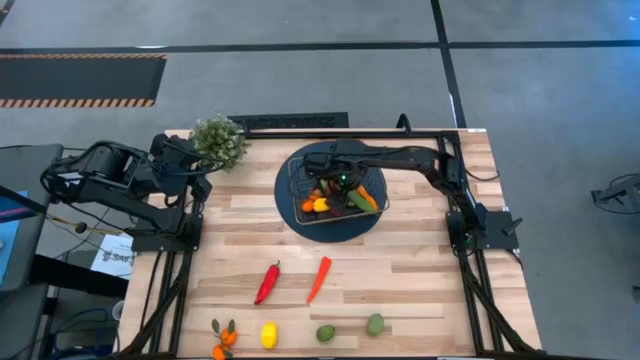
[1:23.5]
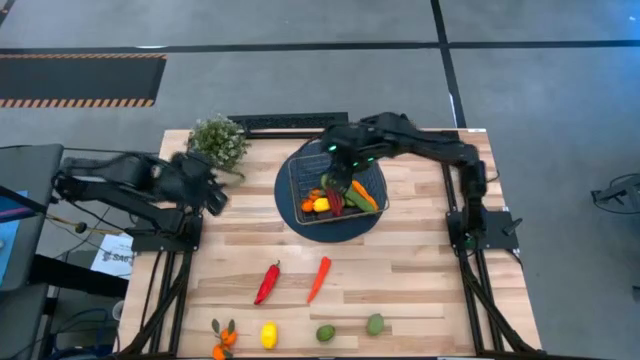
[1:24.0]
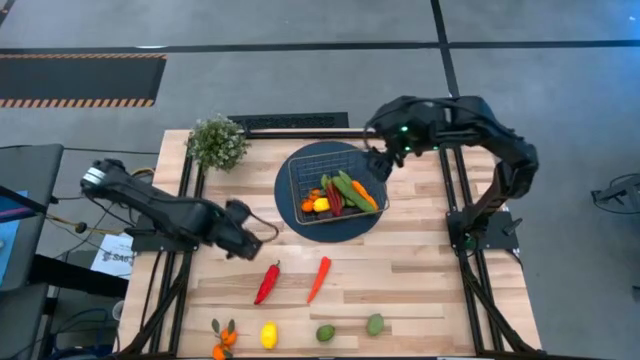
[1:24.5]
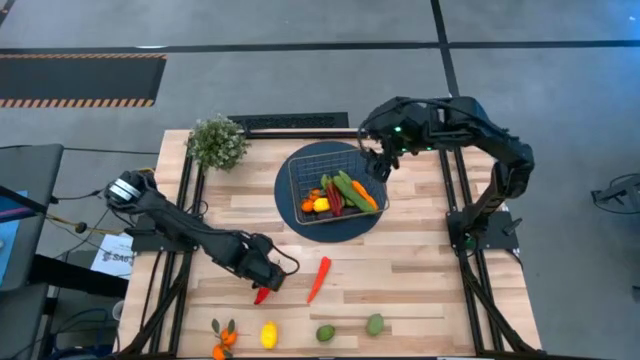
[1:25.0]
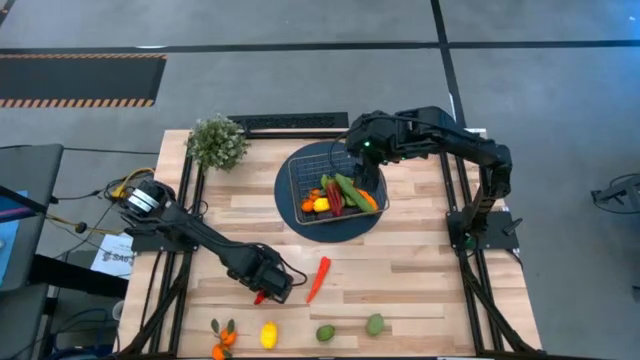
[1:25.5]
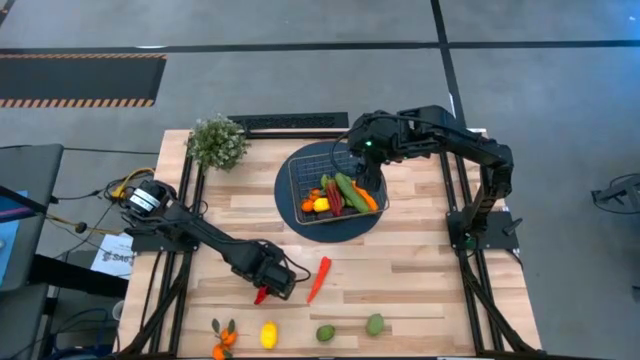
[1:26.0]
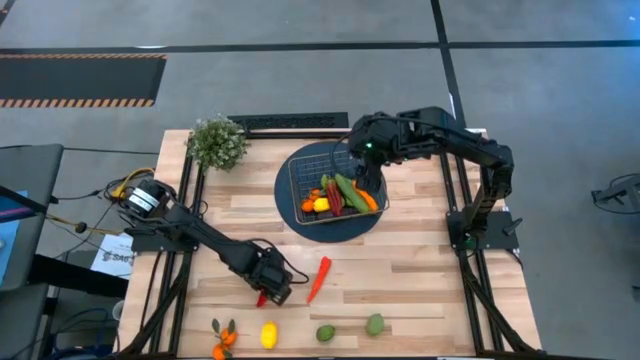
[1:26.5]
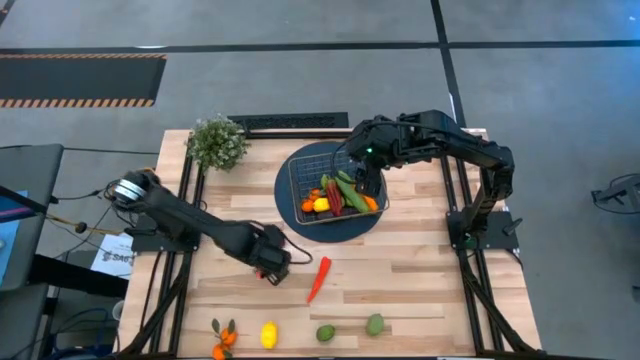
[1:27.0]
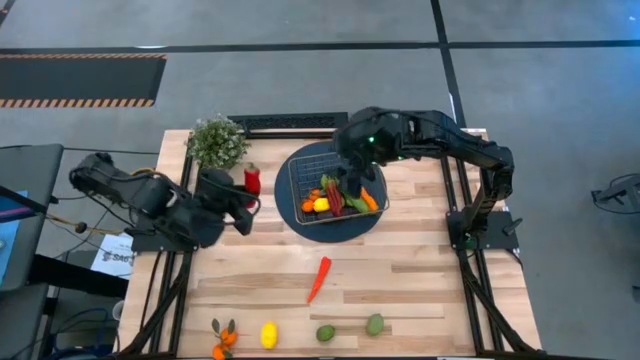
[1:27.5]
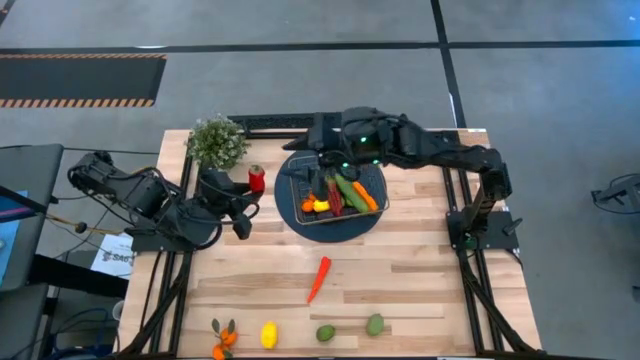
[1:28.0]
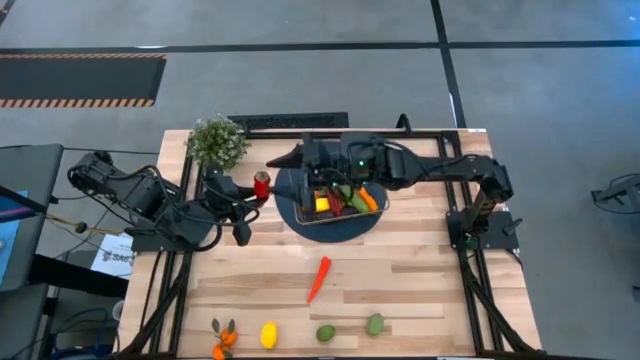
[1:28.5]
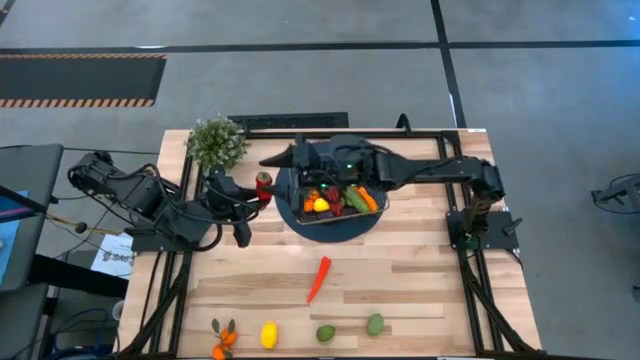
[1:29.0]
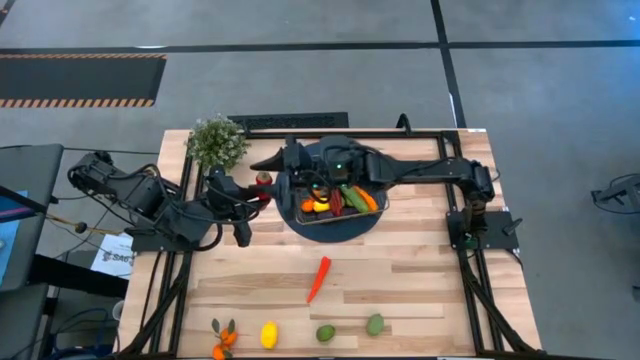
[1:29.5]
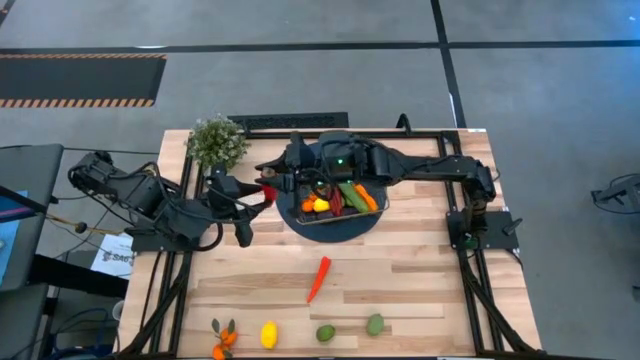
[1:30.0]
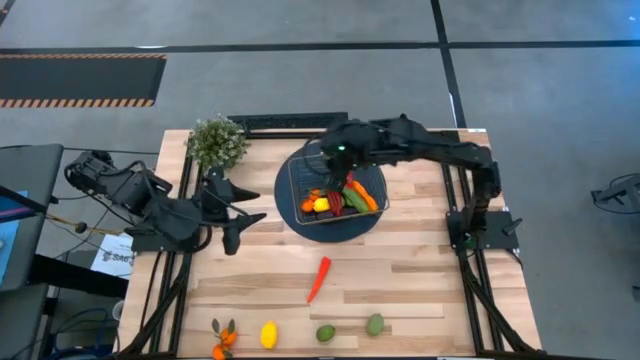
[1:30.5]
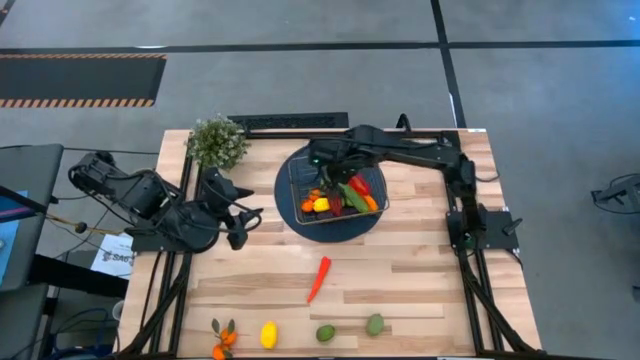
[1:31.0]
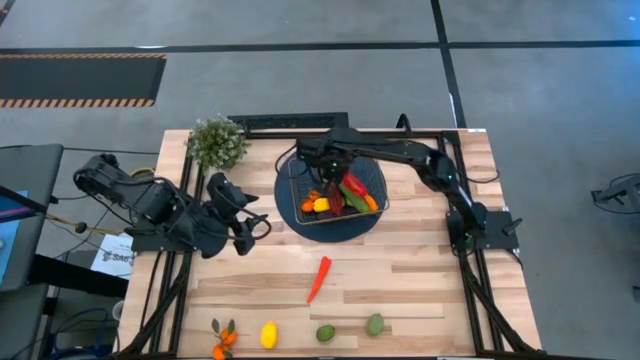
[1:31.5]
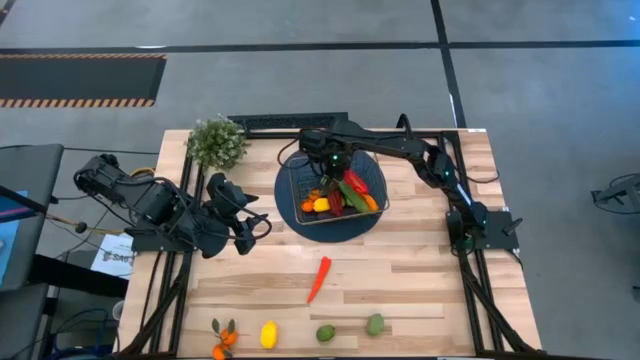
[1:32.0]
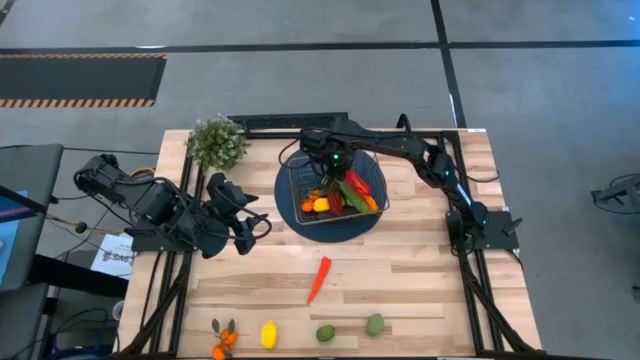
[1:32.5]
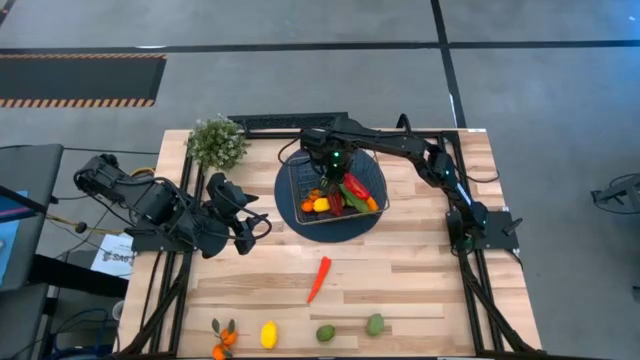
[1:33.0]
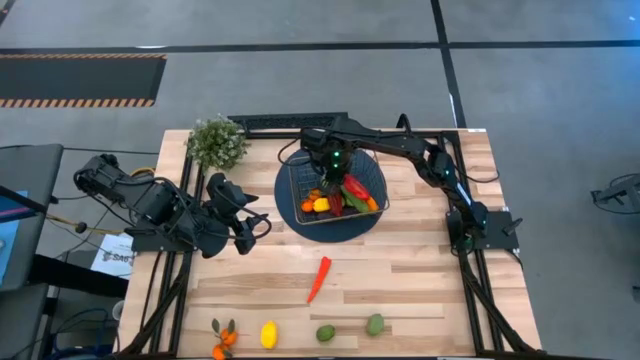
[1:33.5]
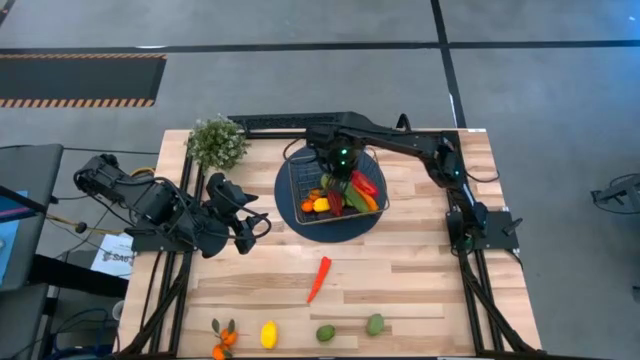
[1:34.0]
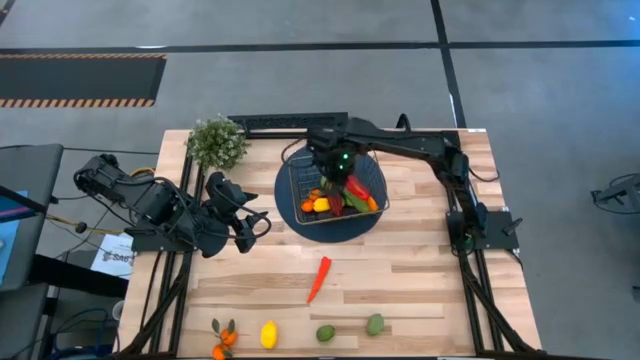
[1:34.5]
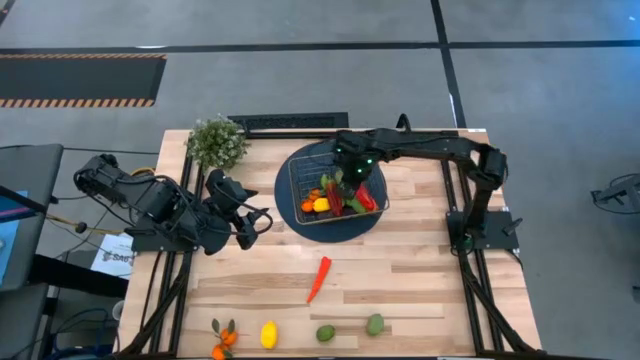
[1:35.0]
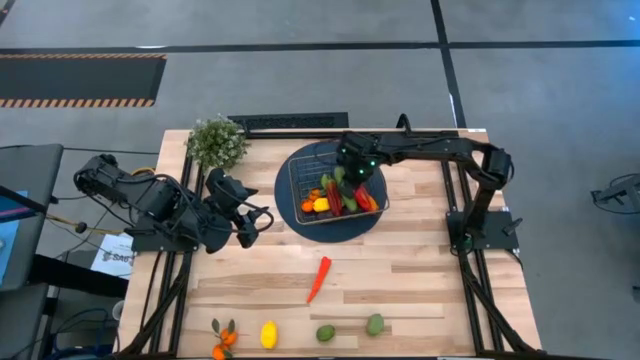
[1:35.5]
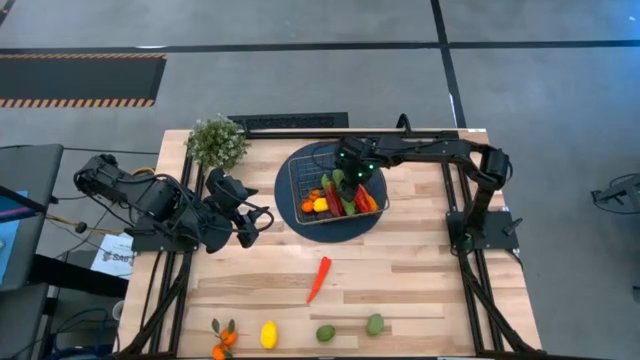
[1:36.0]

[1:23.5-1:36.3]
Task: Build produce basket
Put the red bell pepper into the basket

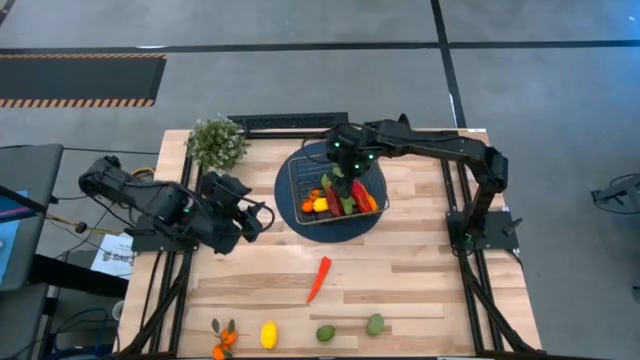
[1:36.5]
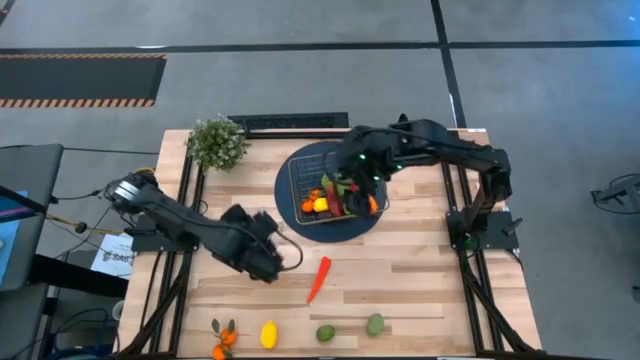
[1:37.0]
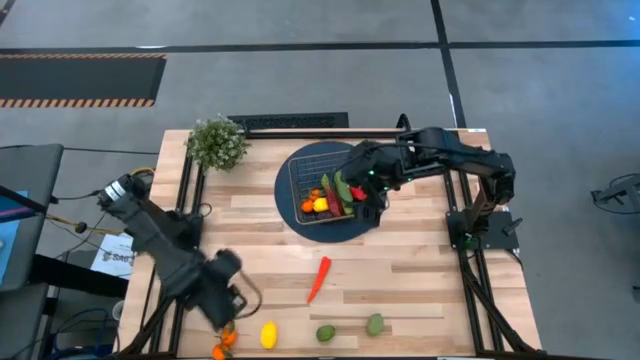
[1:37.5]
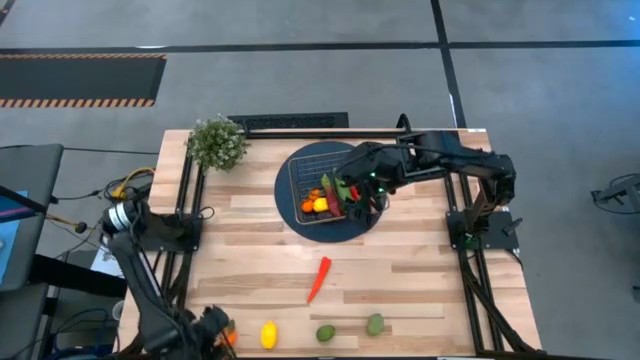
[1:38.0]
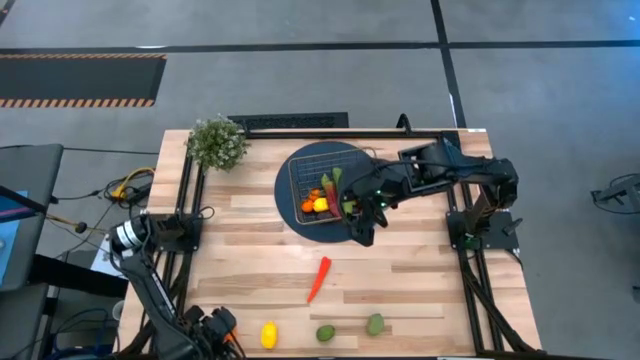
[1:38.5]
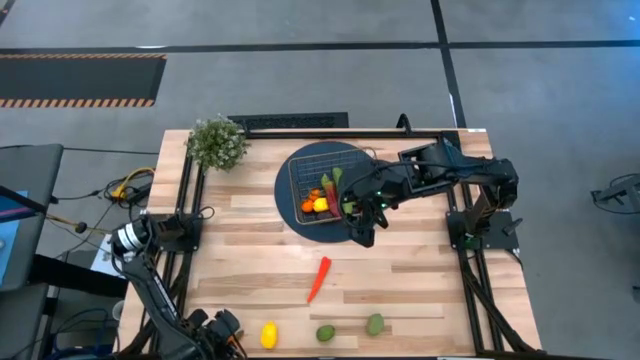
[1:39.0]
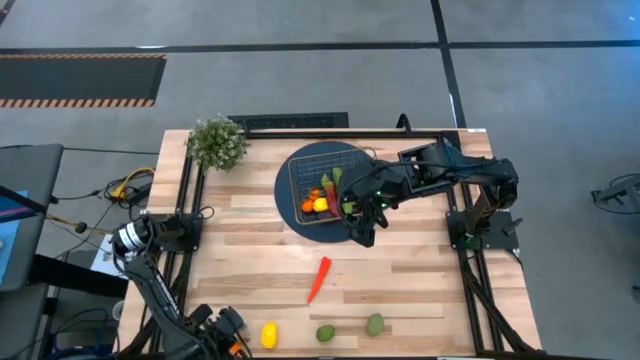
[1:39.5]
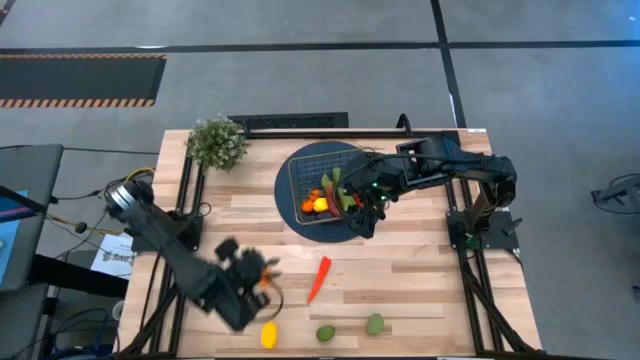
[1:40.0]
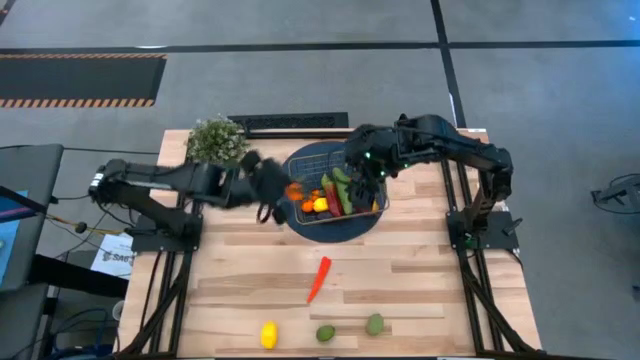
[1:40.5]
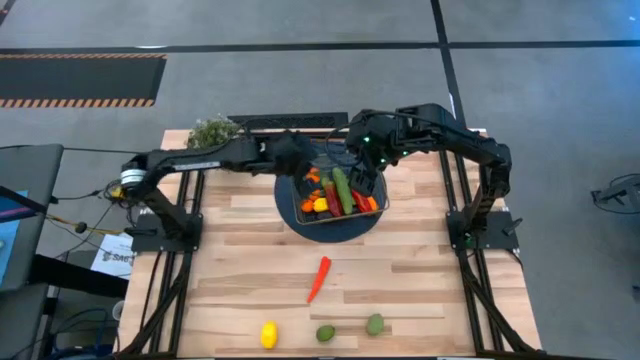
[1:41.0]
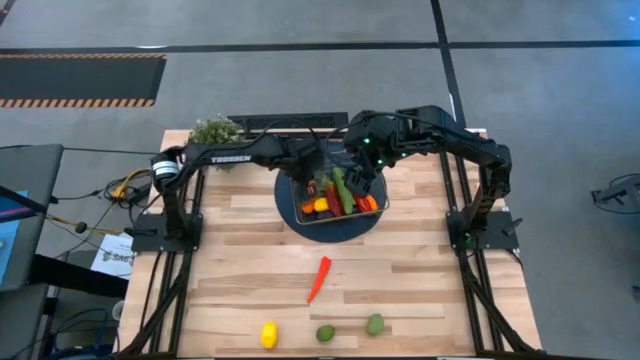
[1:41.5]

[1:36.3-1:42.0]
Put the bottom oranges into the basket

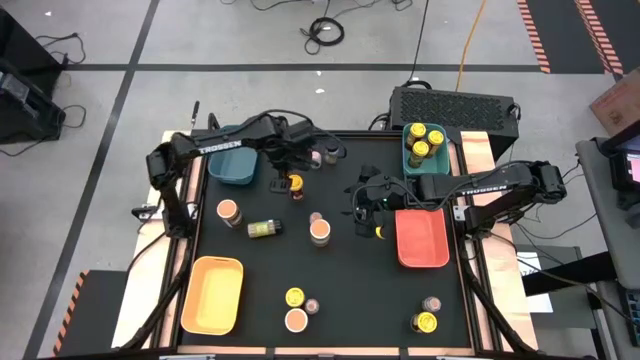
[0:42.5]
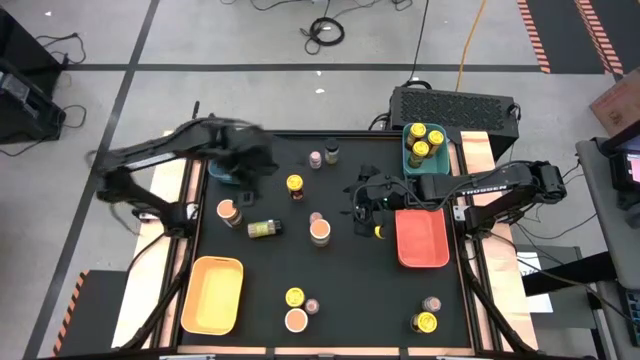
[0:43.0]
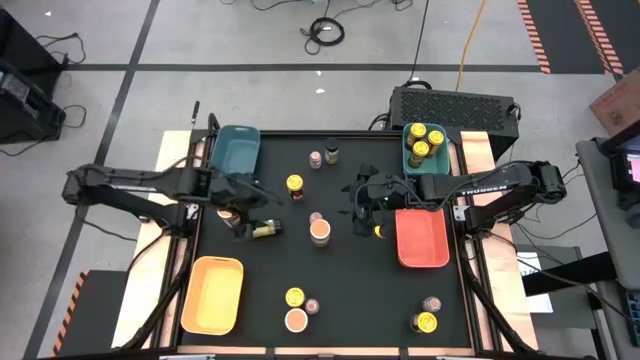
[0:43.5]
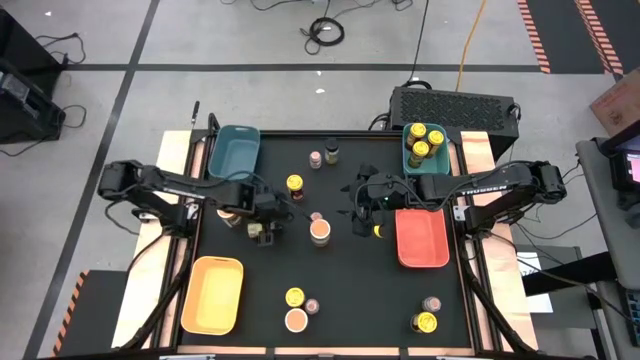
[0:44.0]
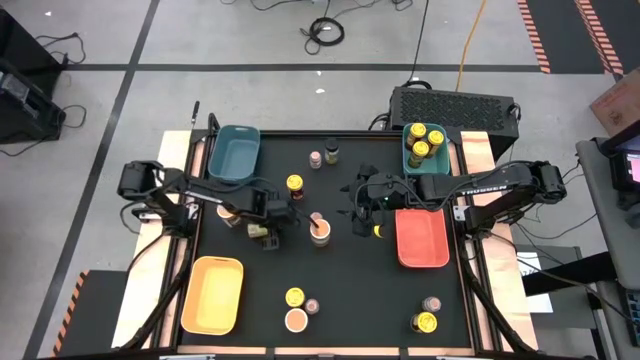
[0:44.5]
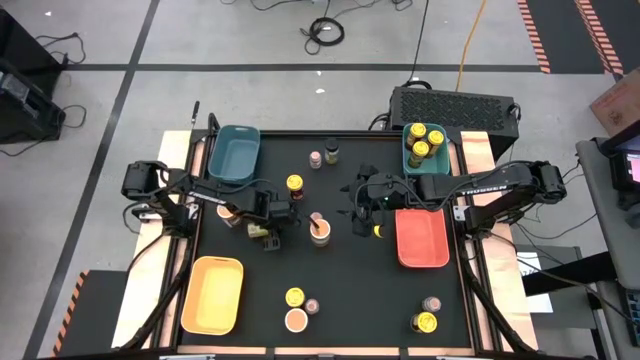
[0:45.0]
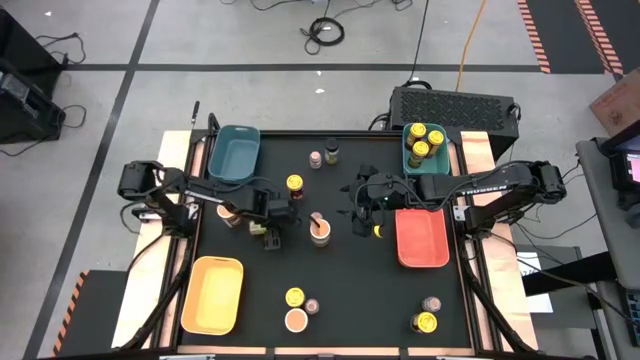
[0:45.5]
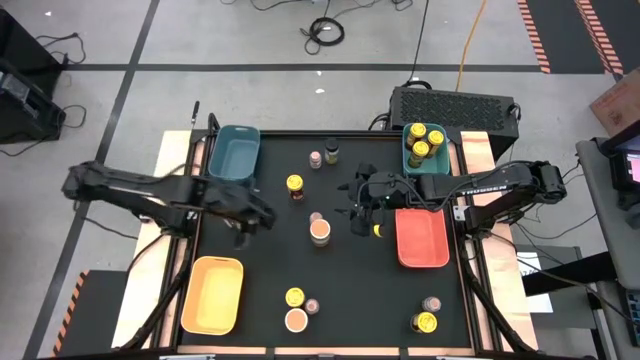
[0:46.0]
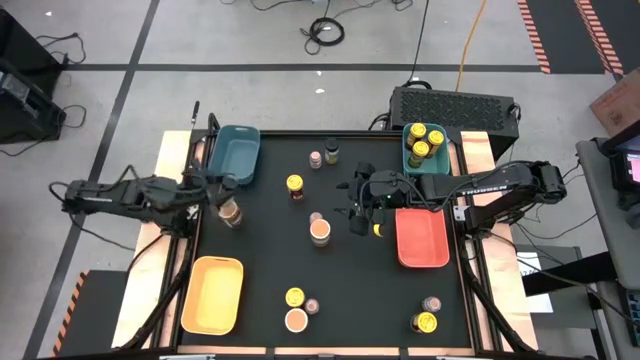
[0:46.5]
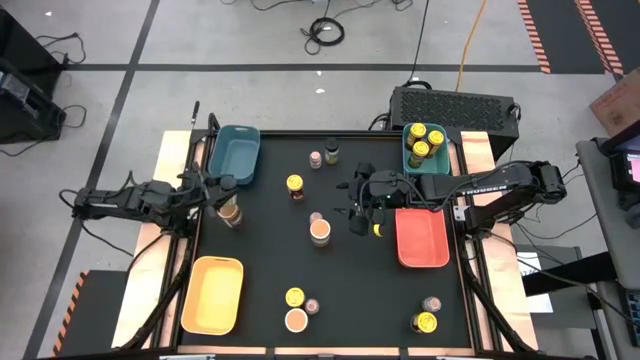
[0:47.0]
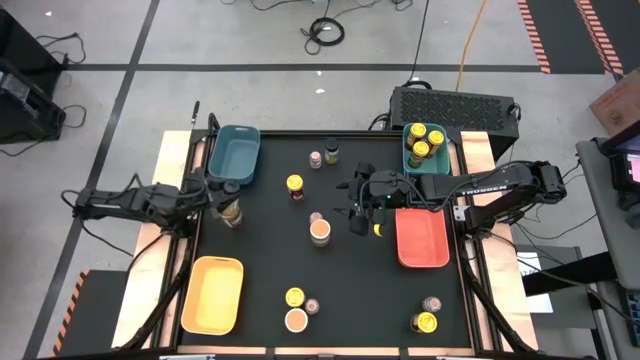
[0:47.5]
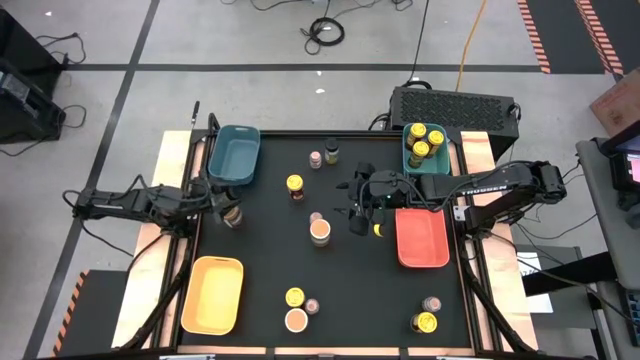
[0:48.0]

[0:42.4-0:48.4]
Task: Sort spices by type
Adjust the black spice bottle
